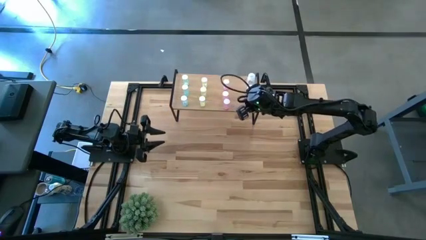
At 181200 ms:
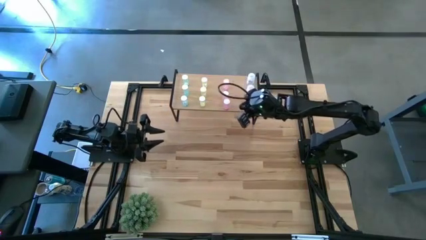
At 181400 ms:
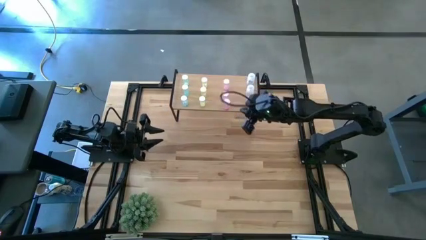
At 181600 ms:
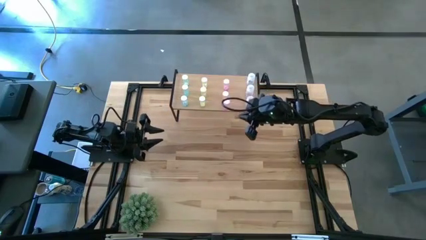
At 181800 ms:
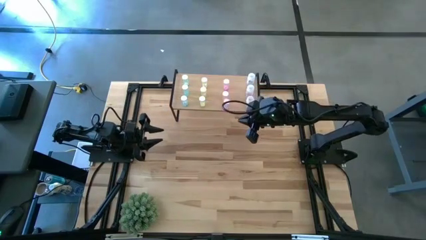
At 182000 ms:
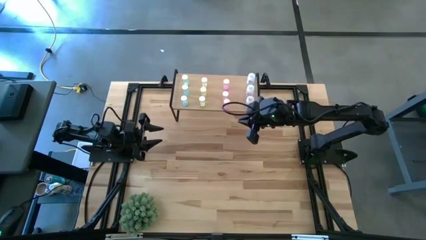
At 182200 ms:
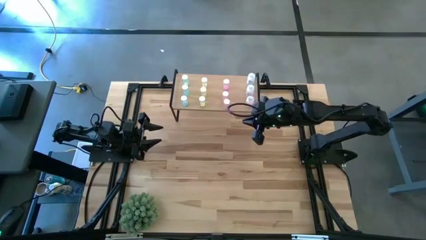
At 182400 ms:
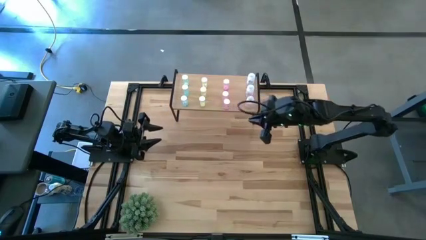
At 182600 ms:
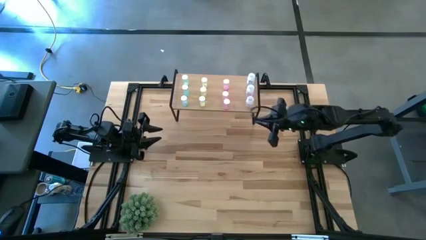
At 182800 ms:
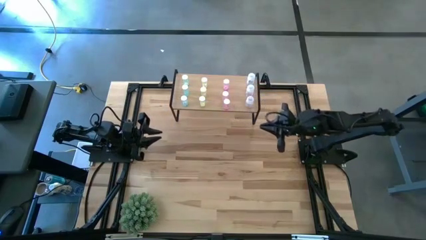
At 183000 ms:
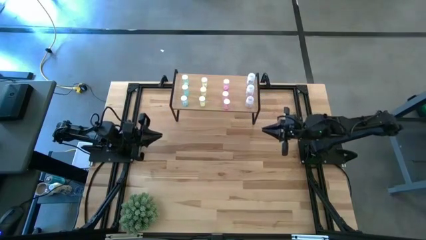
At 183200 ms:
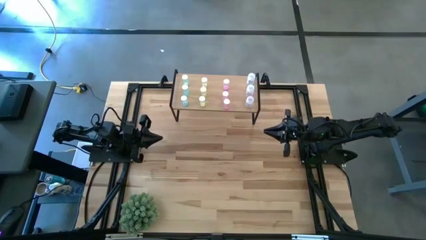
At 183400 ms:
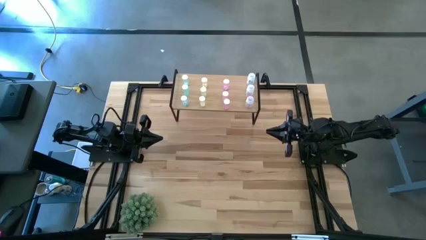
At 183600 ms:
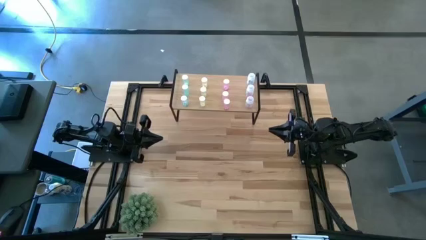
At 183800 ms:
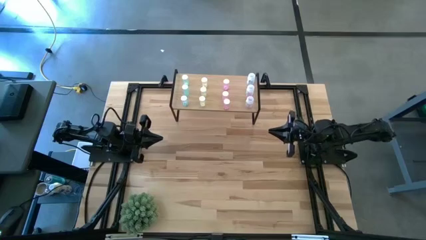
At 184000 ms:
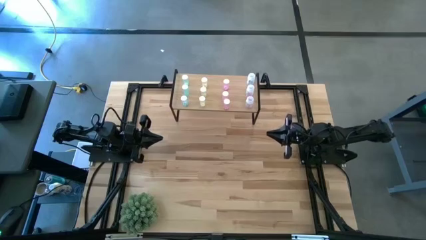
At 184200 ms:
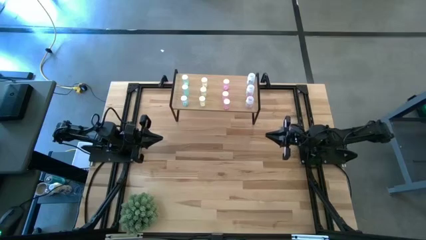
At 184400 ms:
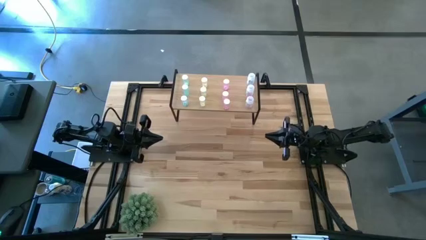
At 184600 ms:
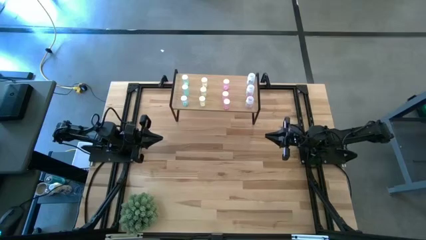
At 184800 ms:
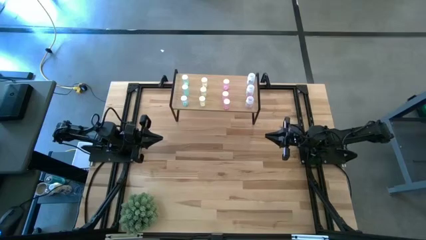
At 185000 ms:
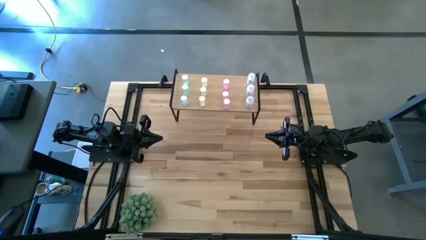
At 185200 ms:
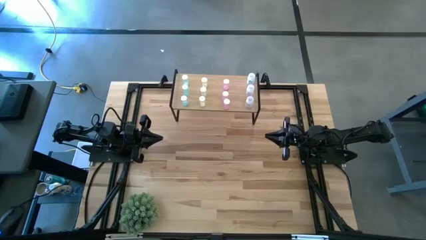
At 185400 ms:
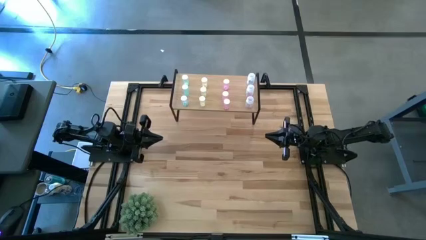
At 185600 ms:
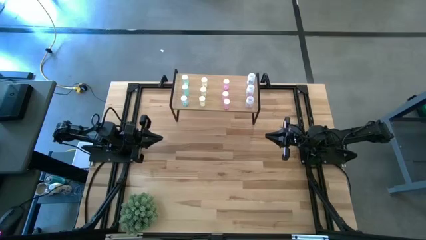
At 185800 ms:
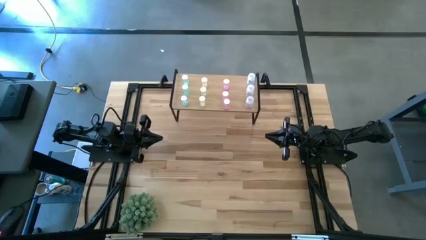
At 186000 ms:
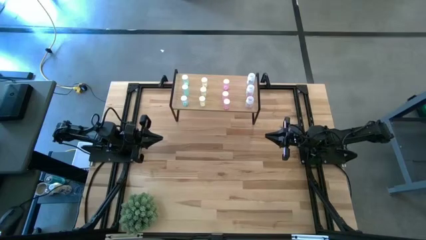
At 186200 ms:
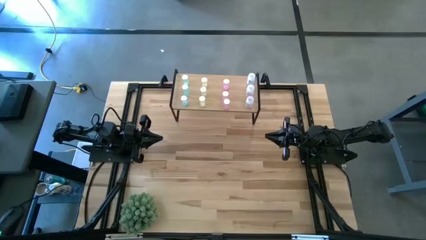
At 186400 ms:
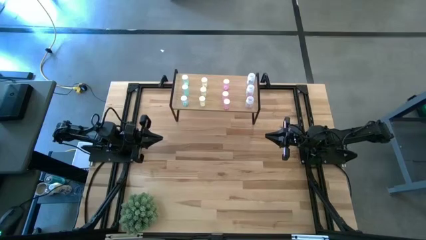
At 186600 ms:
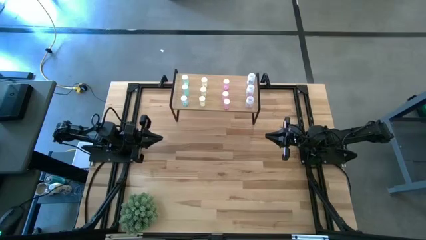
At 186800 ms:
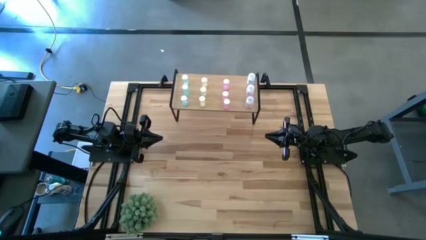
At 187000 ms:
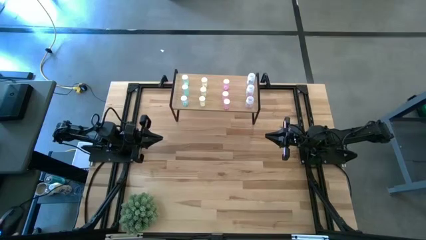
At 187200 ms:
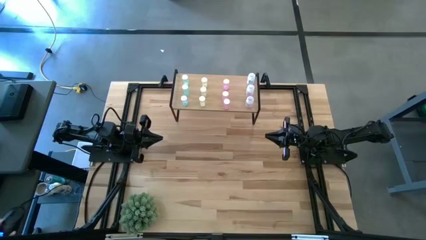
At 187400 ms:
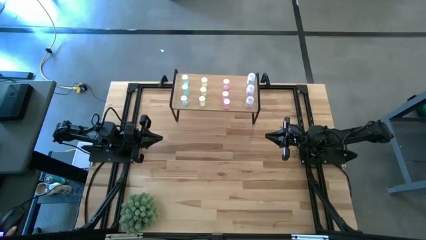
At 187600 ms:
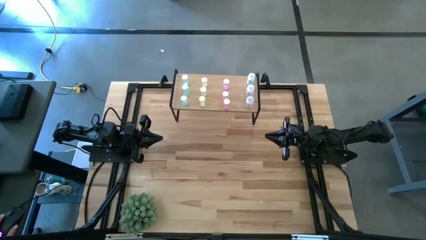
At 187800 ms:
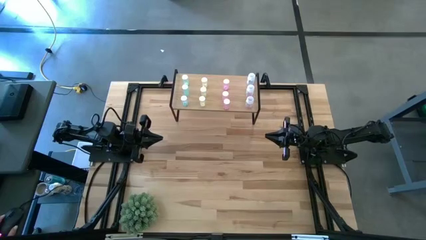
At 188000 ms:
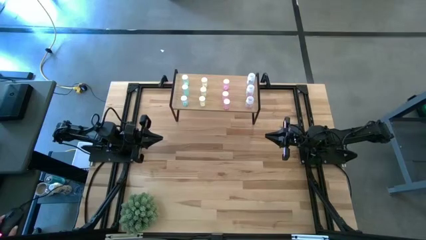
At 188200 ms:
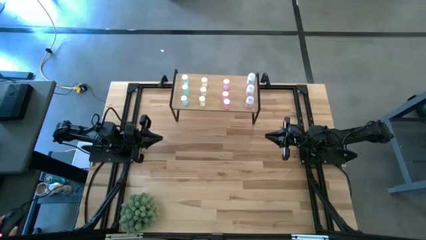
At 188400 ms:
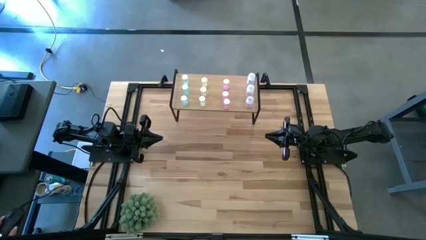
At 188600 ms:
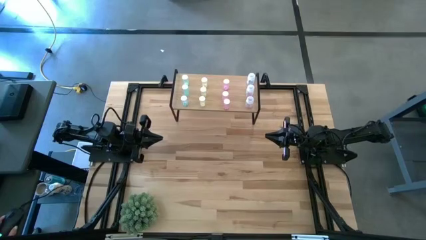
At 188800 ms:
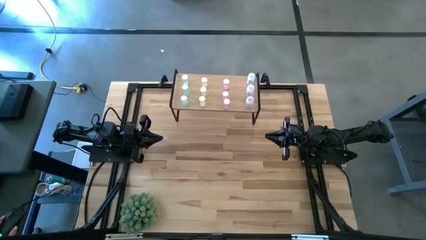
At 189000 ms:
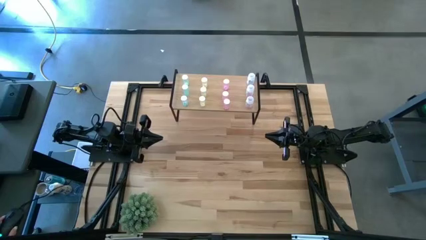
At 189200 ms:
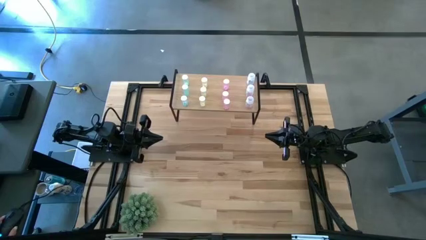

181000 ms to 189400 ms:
Task: Pick and place medicine bottles onto shelf by color
Return to Home Position

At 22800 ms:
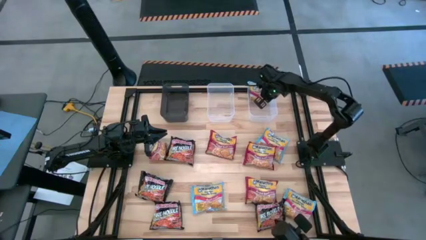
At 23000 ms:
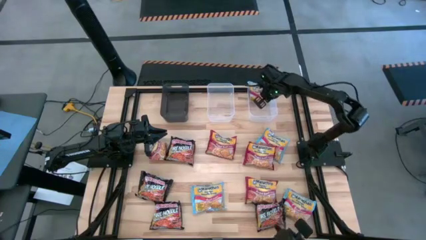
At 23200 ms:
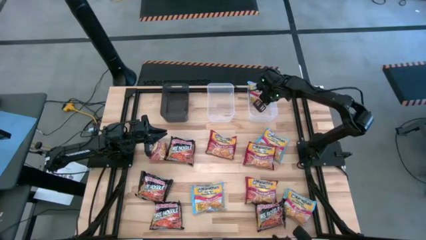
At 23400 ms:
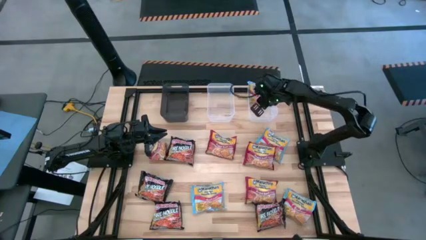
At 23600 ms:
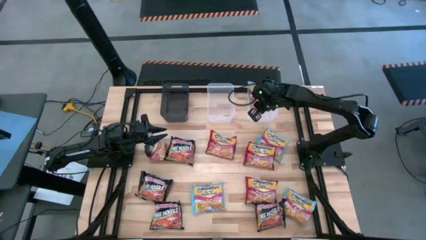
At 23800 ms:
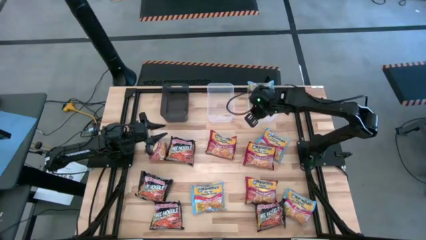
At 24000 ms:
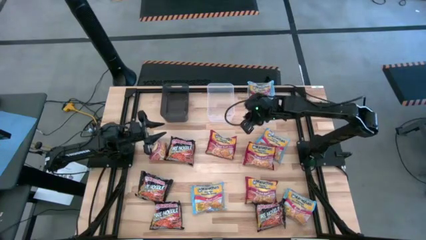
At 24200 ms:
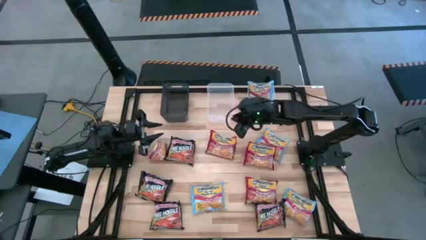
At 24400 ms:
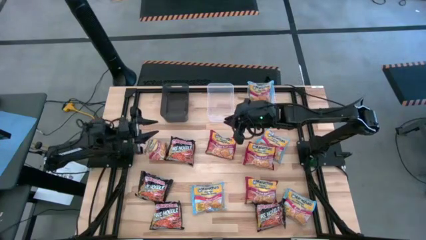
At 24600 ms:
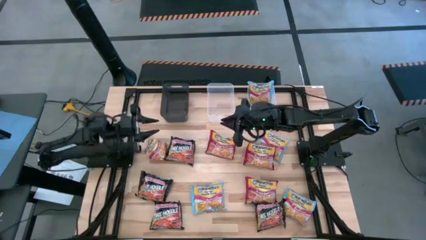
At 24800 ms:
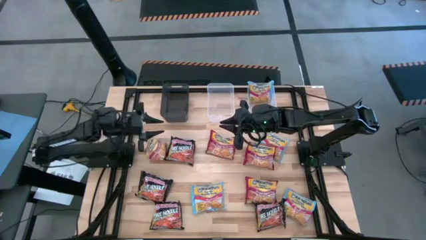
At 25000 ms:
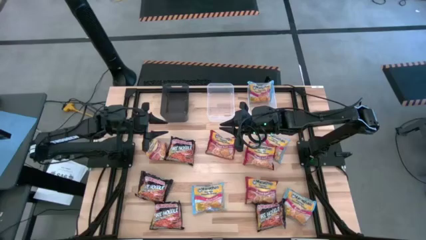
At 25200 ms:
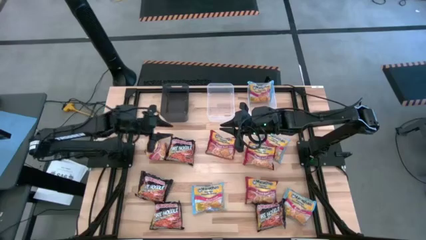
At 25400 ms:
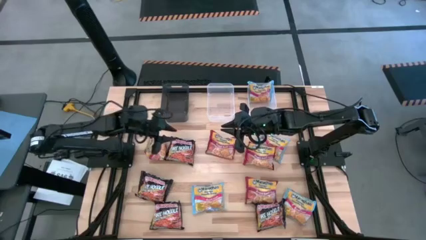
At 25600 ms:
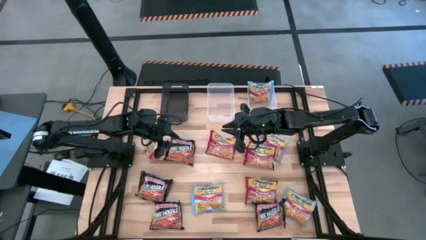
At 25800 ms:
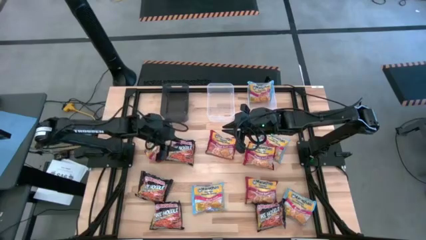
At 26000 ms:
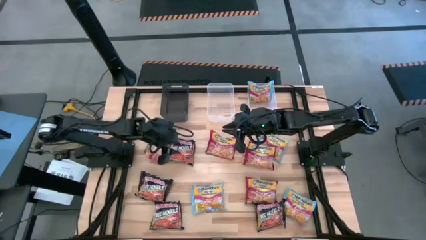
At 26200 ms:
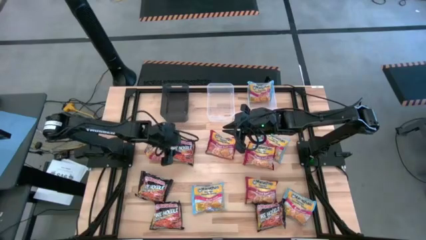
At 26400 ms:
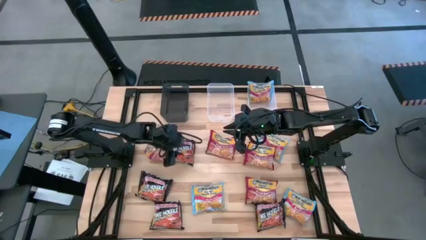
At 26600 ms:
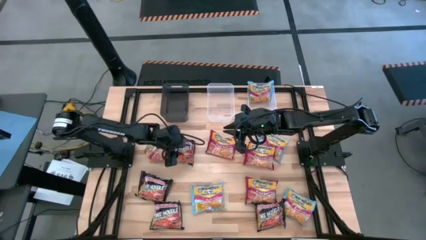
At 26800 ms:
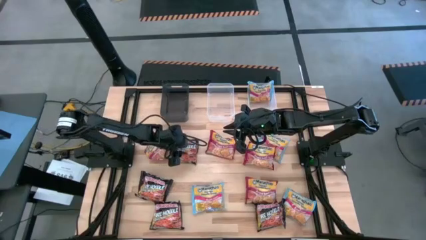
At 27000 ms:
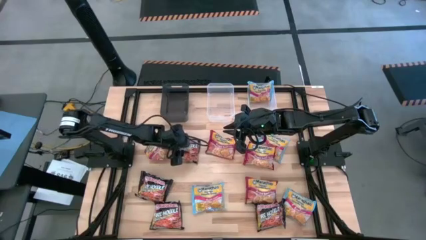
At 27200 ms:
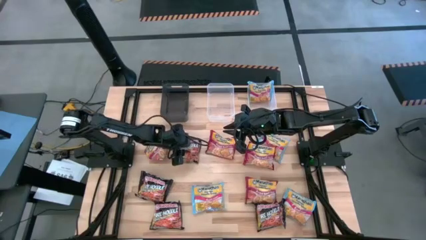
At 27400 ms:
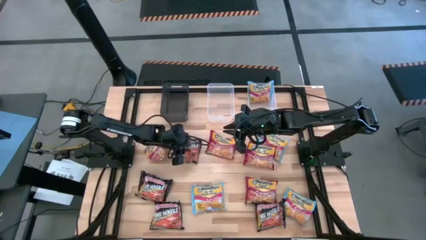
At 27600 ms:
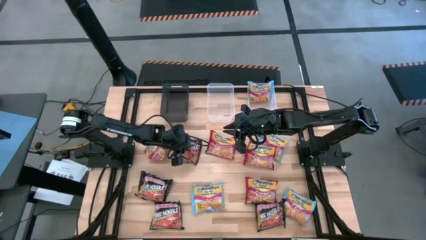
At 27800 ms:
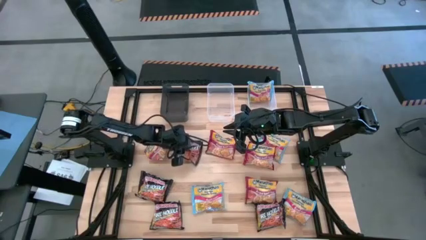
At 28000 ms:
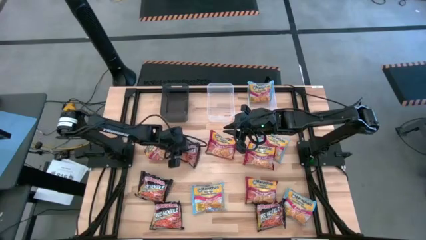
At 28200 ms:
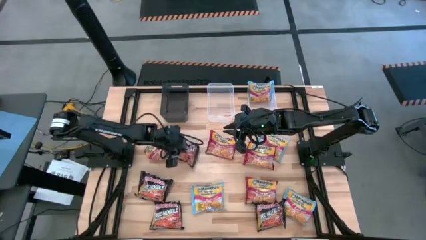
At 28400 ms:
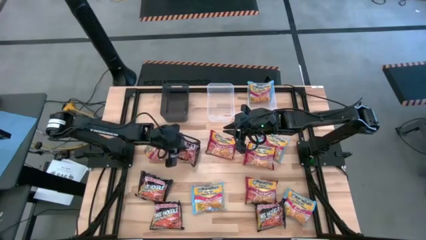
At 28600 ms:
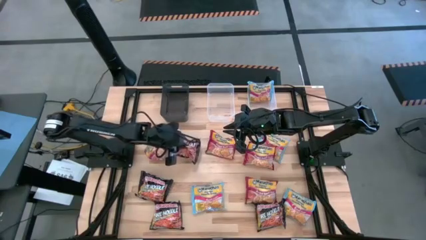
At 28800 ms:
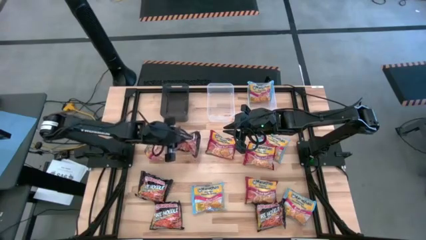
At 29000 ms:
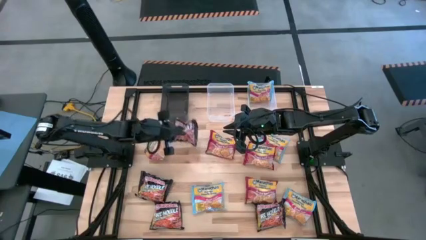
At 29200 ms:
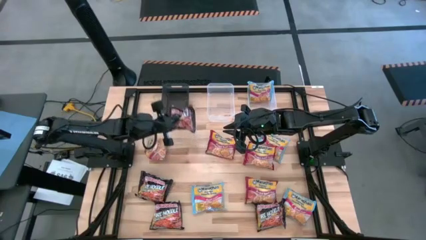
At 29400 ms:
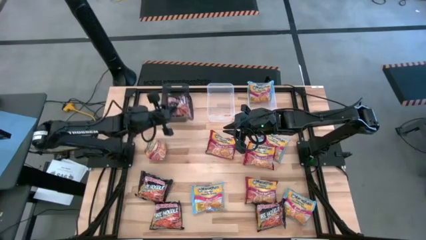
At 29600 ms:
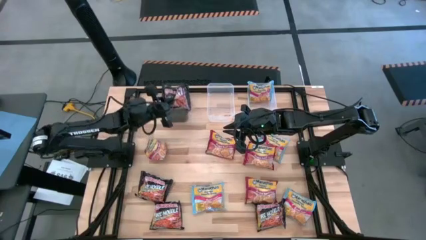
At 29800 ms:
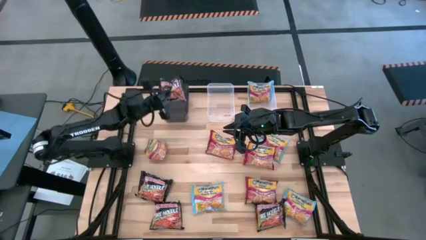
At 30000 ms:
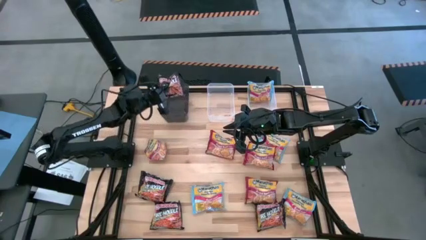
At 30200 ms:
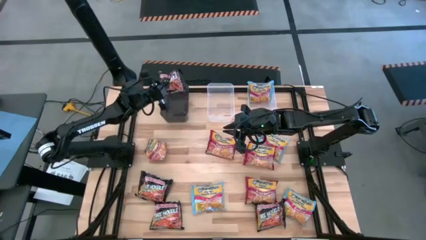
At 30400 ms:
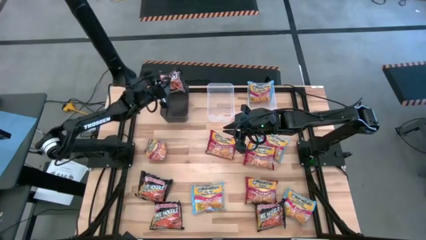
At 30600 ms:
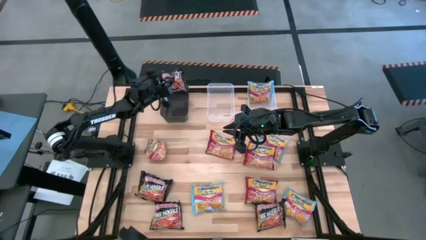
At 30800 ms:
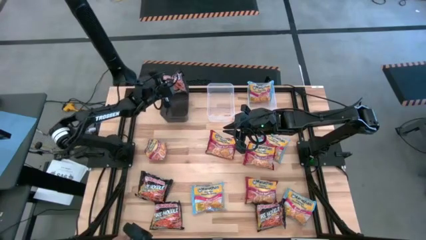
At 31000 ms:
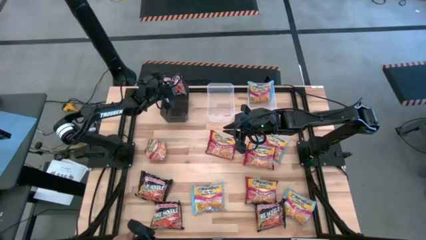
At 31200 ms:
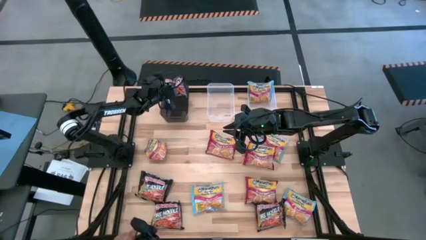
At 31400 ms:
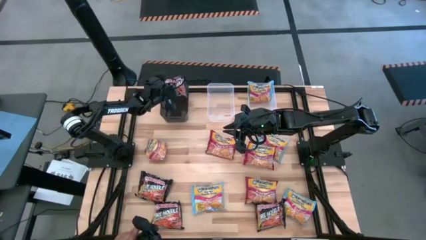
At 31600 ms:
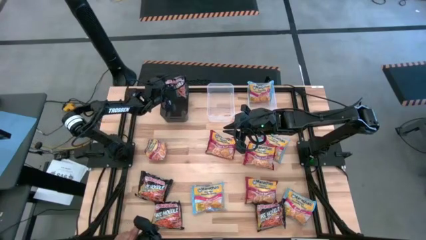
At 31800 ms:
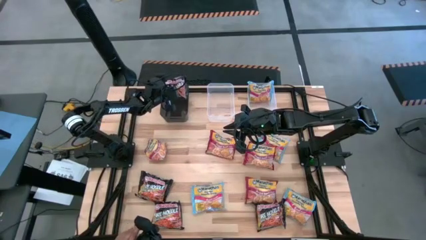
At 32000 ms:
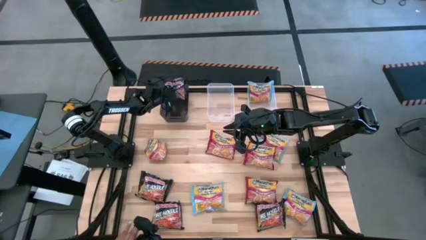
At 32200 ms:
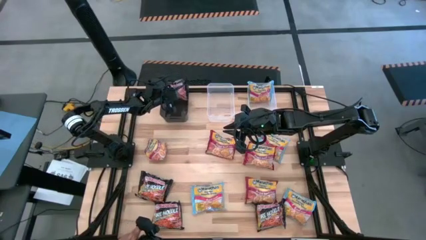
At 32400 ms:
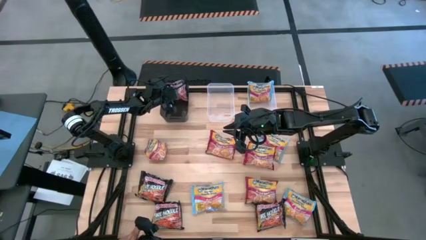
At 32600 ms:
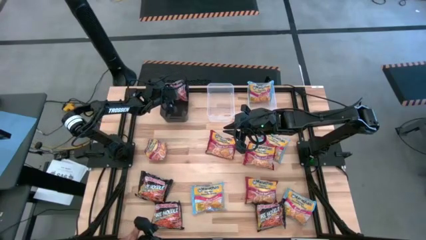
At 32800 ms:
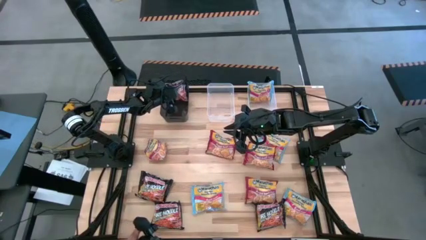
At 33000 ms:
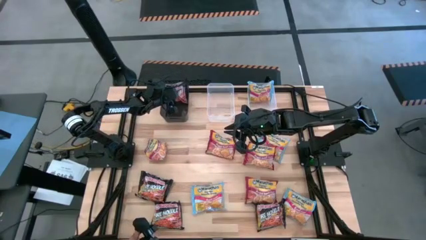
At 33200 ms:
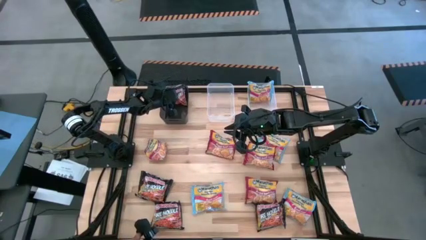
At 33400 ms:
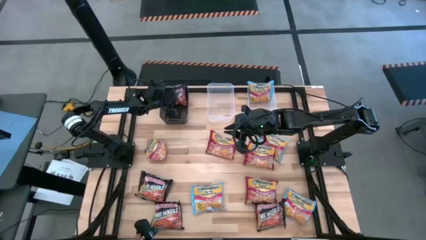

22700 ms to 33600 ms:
Task: Sort Maruchan noodles
Put the black noodle pack into the black bin
